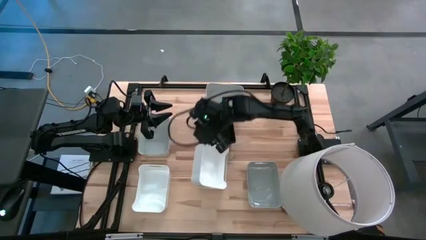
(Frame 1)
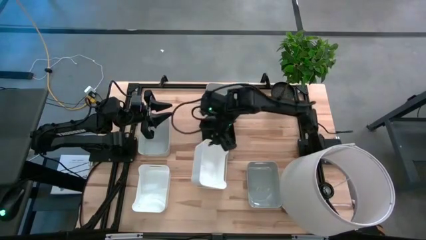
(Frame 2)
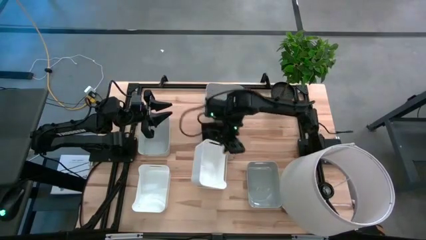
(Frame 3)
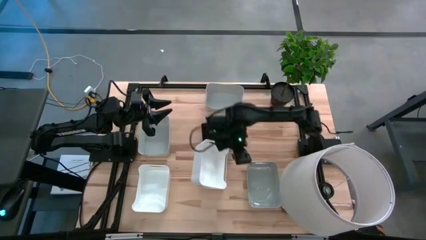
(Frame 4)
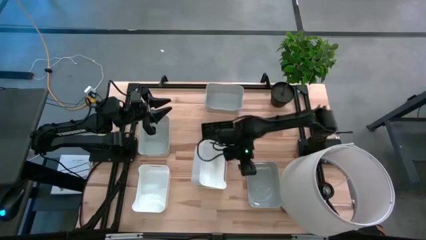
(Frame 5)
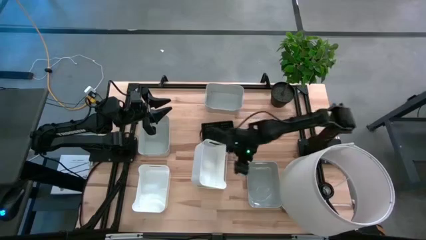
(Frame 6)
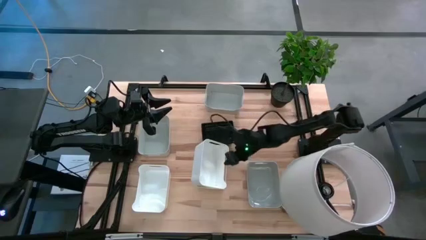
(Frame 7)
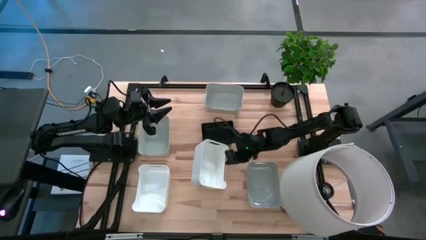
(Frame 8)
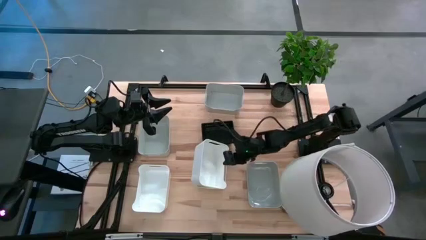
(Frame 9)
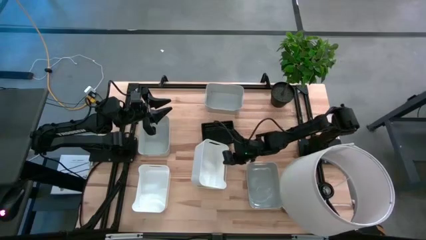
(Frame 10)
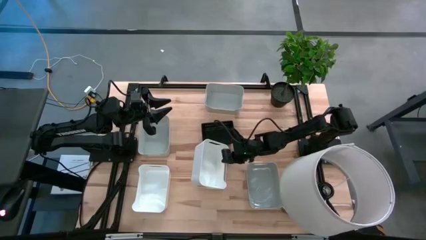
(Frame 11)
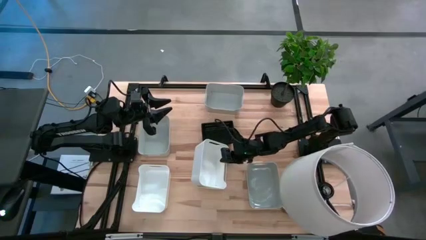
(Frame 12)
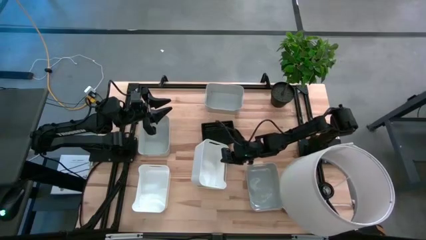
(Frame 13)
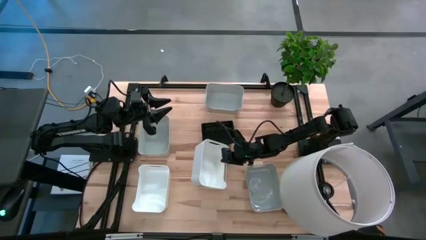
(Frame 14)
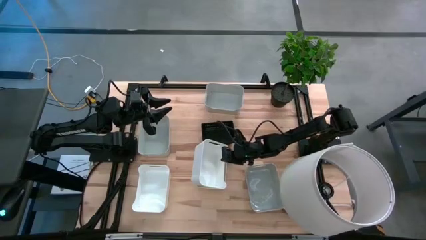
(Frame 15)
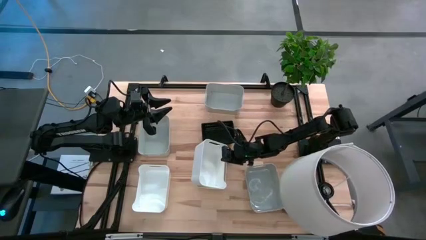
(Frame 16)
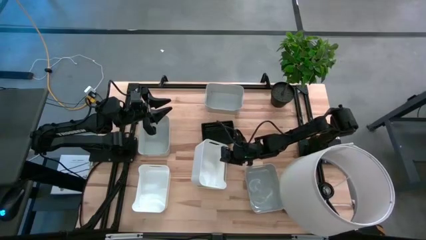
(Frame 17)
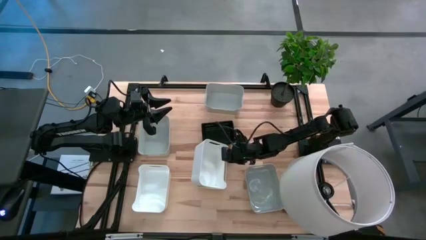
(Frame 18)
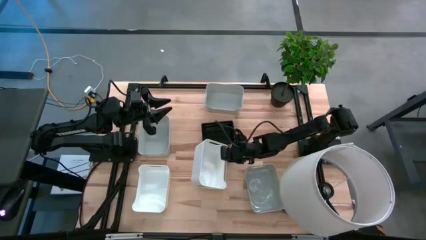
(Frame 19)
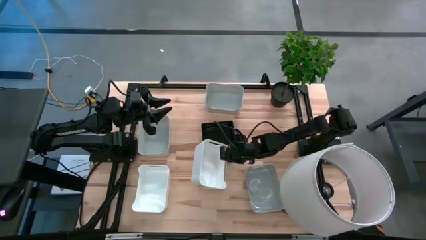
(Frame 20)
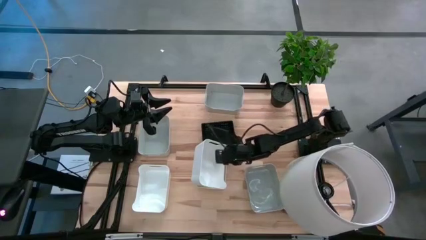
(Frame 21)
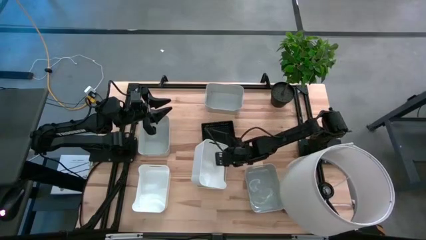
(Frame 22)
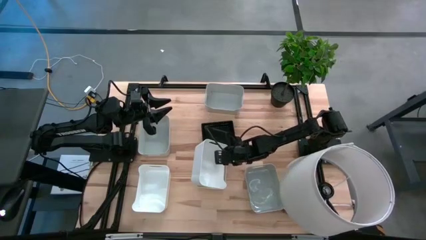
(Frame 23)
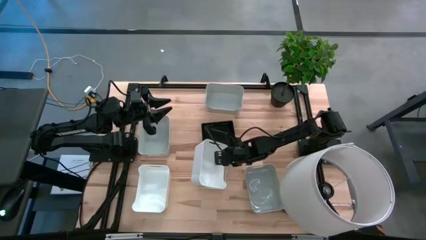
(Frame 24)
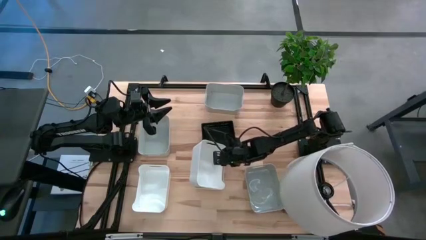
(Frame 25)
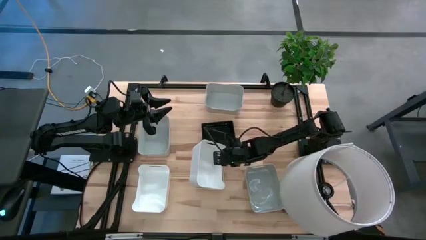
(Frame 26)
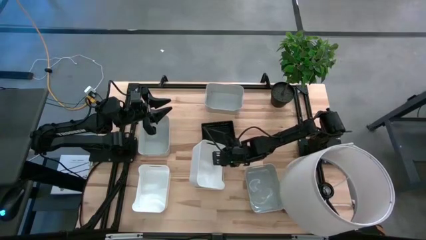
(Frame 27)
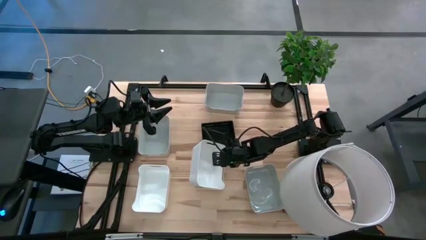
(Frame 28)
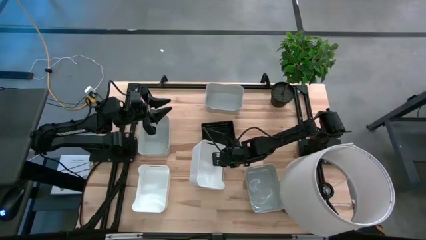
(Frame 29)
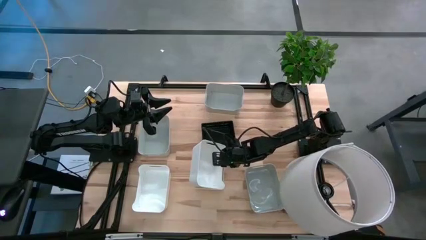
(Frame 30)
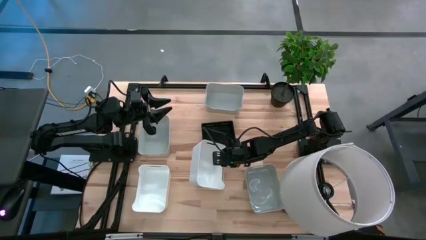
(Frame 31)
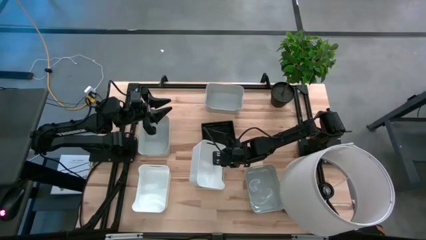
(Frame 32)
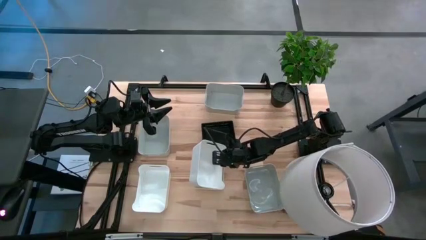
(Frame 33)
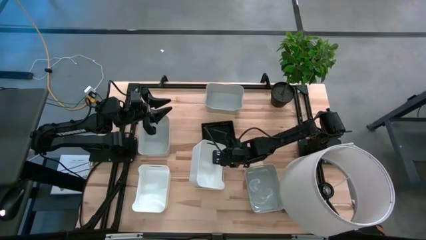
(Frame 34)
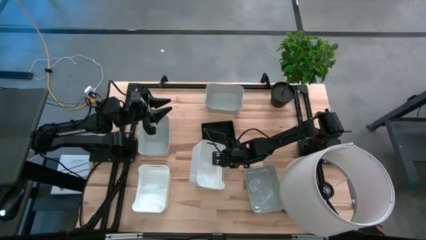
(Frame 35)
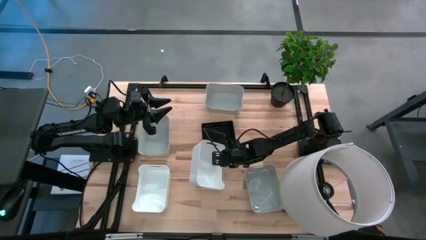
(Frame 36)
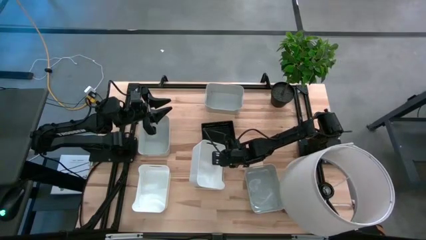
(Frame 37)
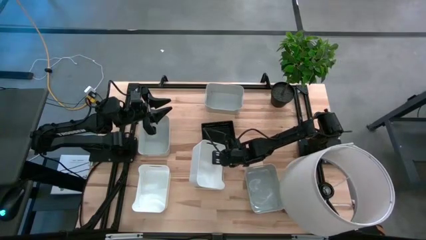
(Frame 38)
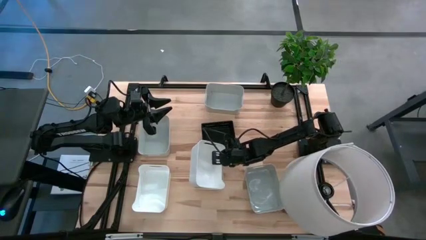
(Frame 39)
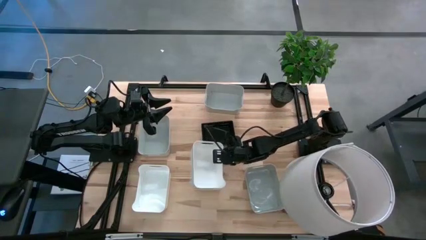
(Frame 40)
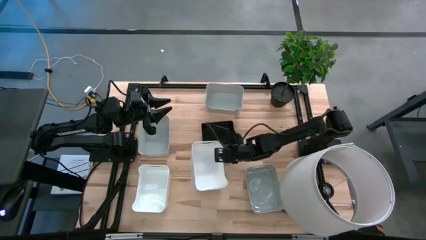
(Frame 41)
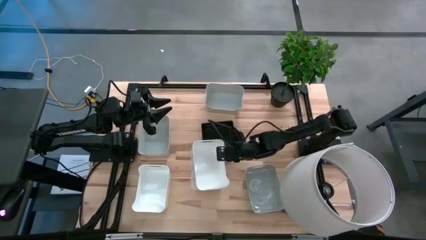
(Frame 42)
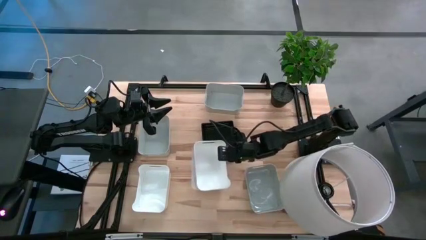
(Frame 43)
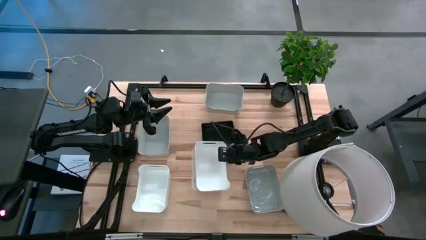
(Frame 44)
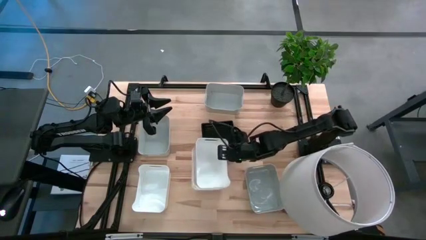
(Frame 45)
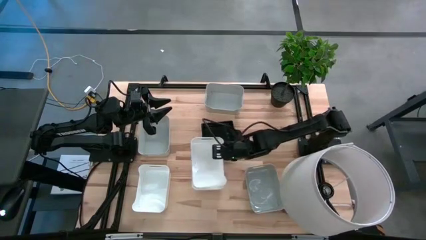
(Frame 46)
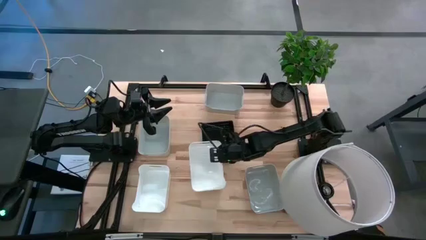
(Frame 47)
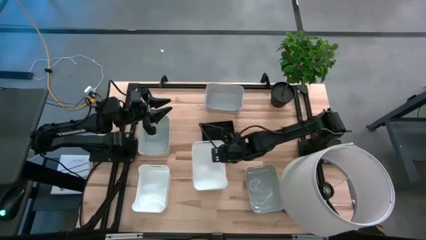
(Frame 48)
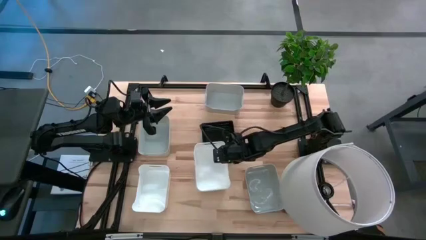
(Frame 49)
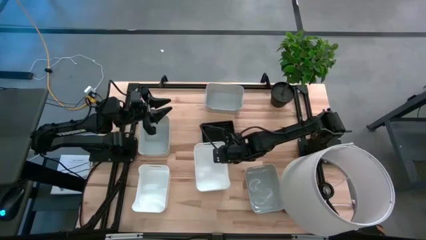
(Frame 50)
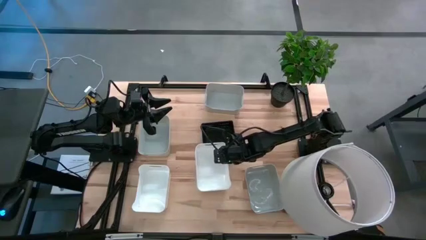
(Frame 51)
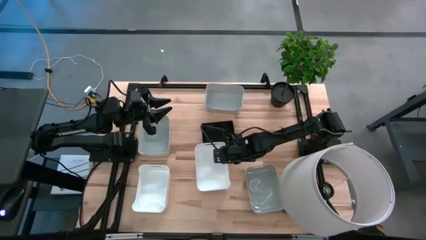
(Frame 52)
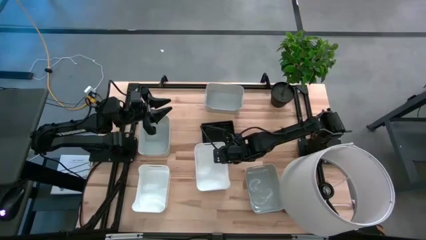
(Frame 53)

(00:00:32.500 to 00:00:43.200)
Stack the top white bin on top of the right white bin
